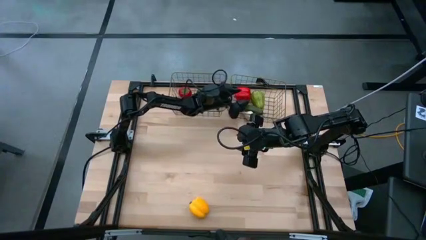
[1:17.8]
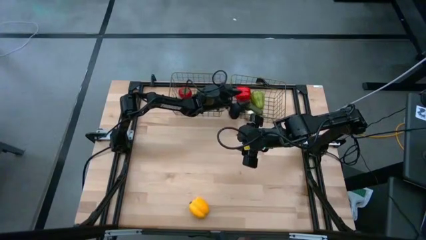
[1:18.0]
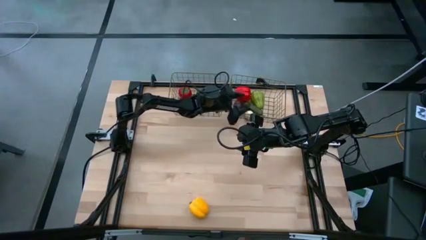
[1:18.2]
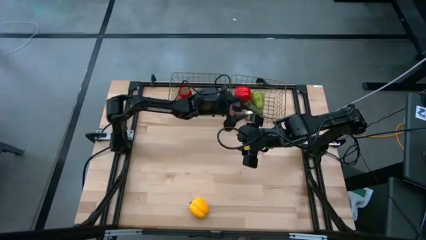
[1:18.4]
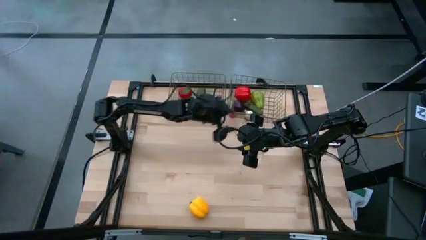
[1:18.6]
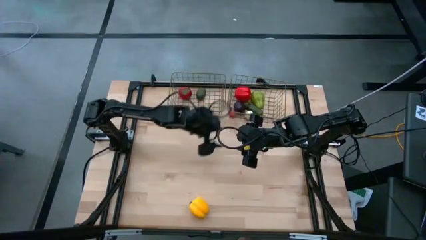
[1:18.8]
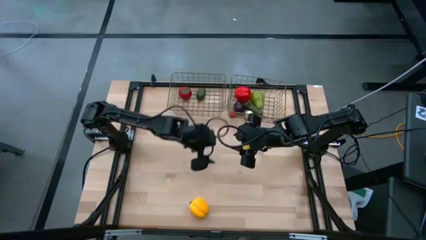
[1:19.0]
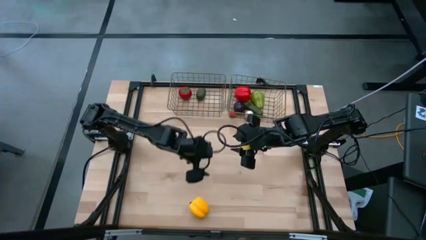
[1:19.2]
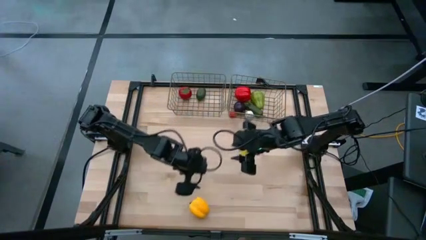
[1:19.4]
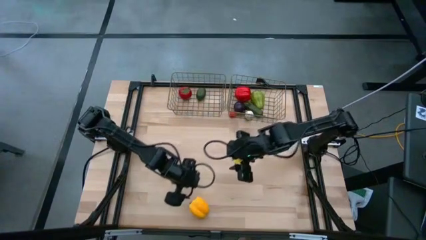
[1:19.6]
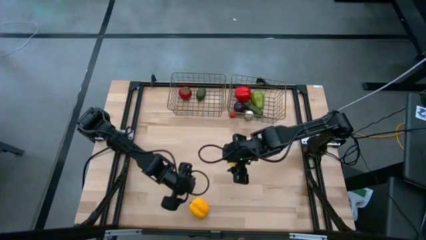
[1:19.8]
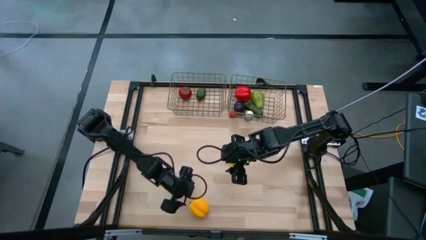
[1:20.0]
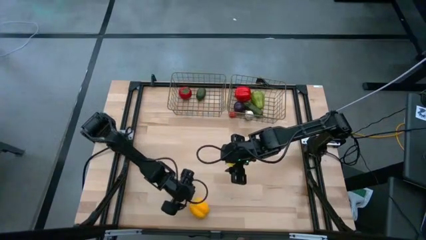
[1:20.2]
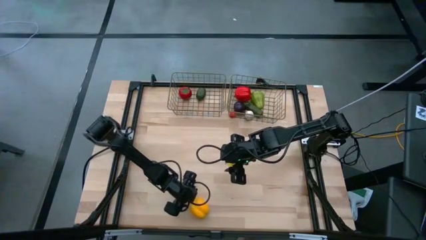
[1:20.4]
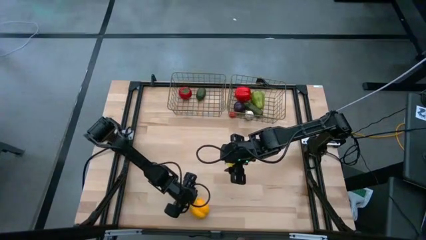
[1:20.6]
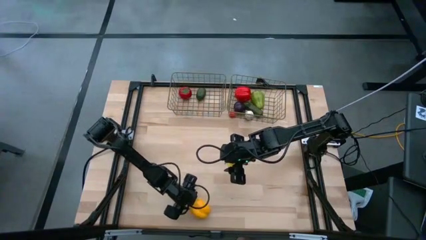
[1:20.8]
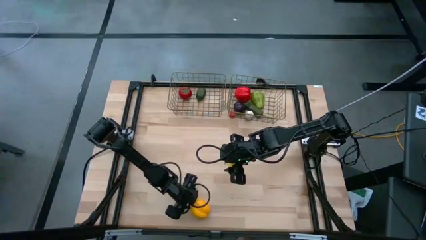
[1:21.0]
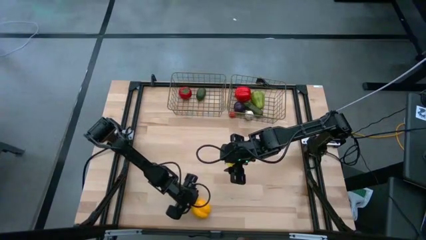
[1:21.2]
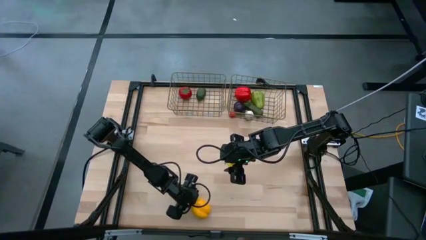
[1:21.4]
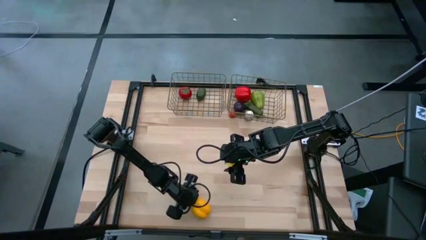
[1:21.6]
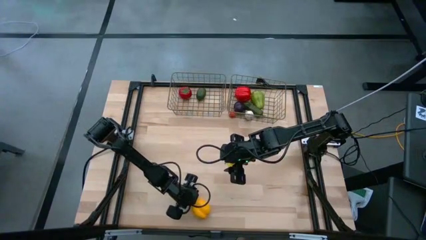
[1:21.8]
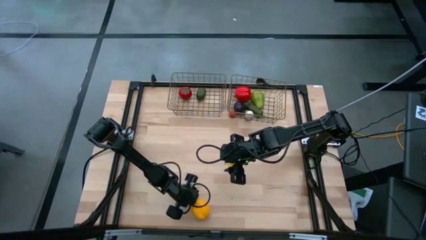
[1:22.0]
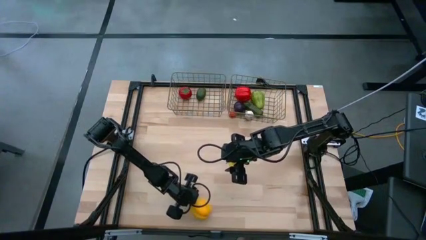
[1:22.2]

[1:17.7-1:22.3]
Task: Sort produce into baskets
Put the yellow bell pepper into the right gold wire basket

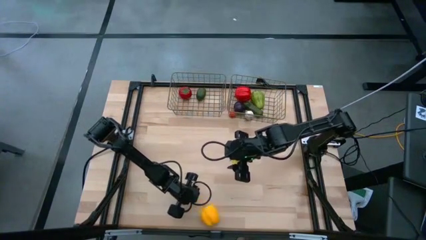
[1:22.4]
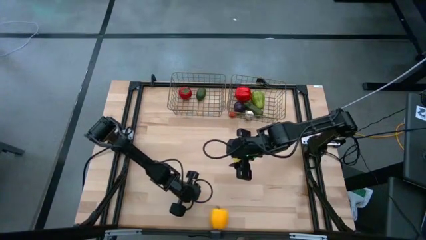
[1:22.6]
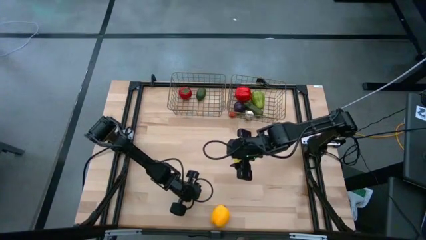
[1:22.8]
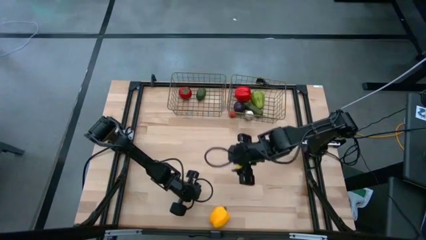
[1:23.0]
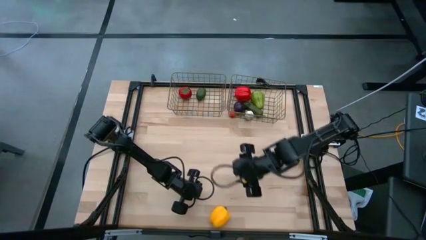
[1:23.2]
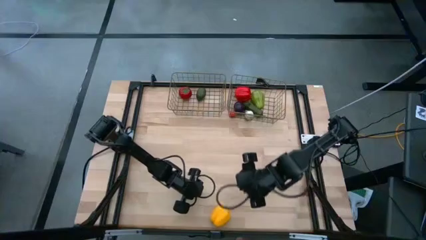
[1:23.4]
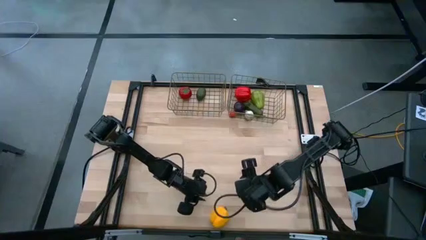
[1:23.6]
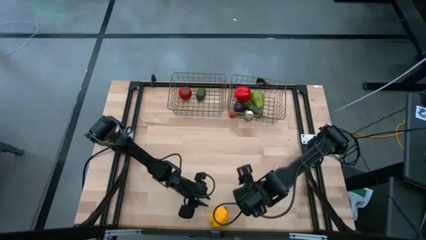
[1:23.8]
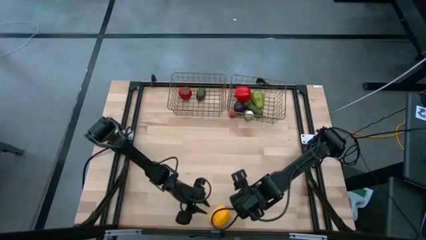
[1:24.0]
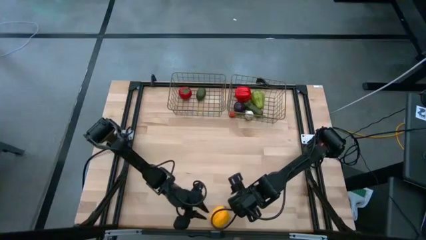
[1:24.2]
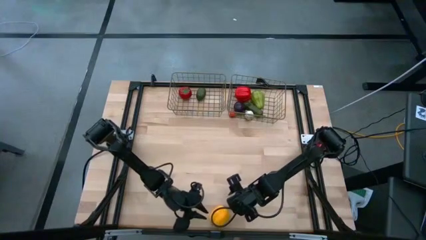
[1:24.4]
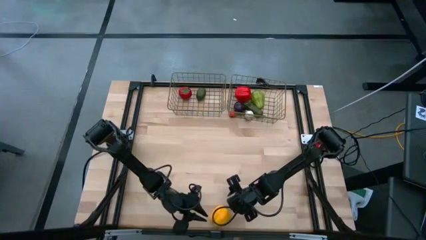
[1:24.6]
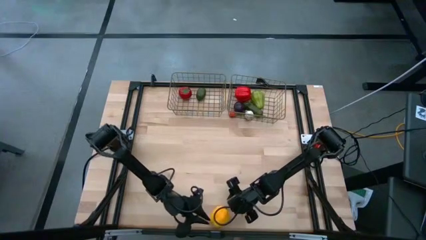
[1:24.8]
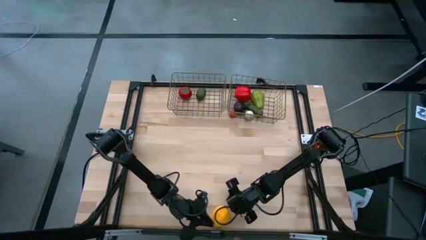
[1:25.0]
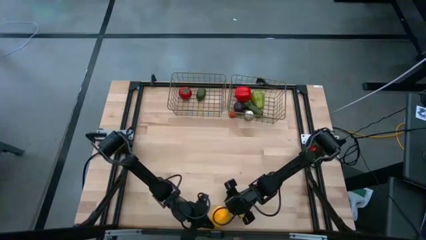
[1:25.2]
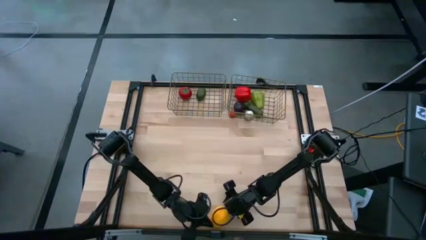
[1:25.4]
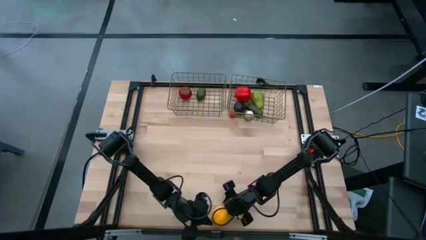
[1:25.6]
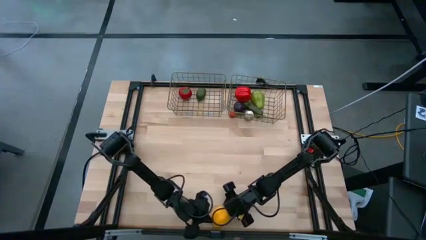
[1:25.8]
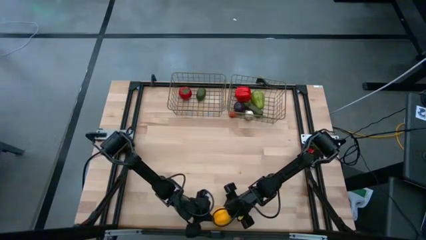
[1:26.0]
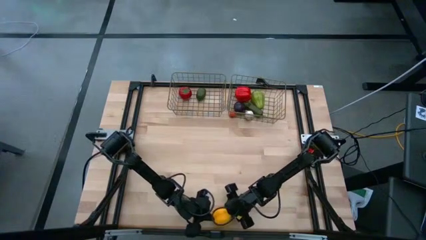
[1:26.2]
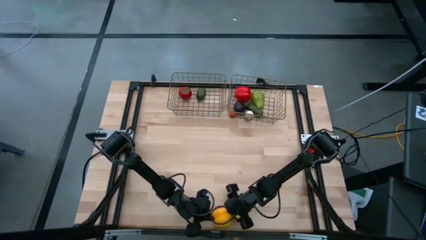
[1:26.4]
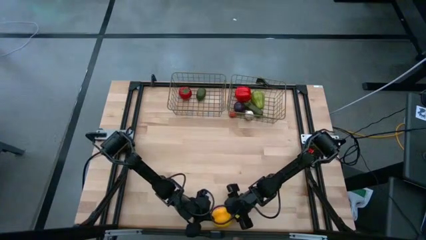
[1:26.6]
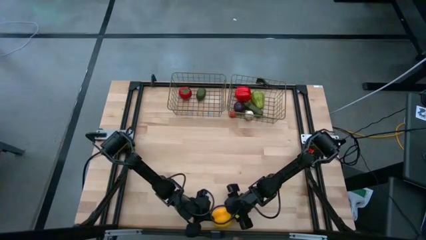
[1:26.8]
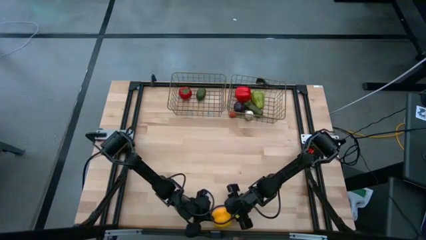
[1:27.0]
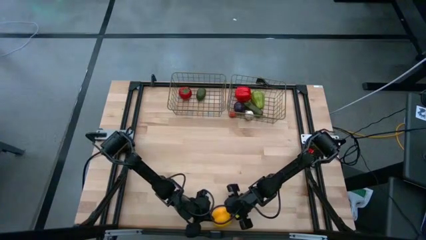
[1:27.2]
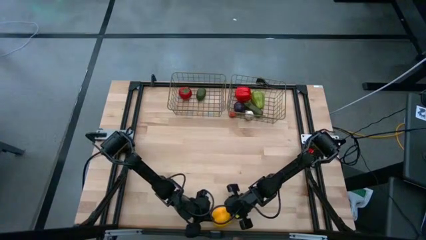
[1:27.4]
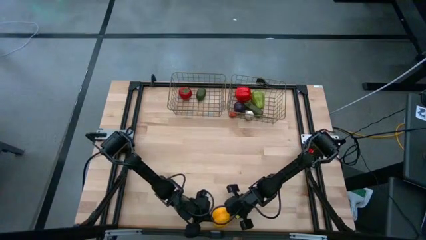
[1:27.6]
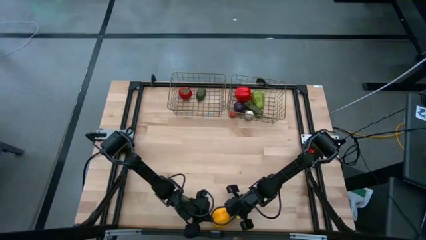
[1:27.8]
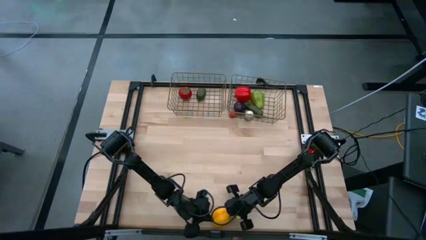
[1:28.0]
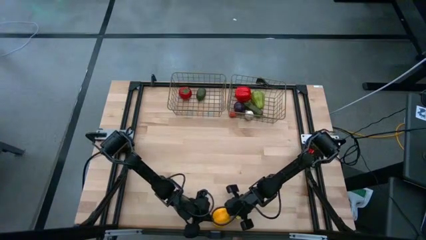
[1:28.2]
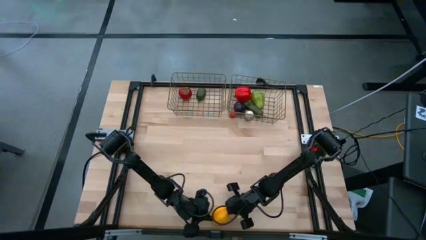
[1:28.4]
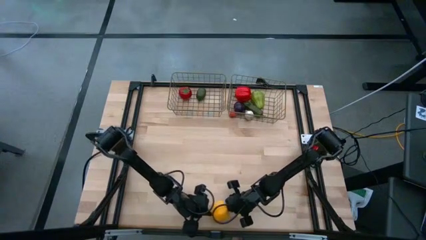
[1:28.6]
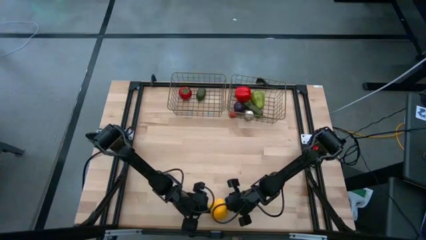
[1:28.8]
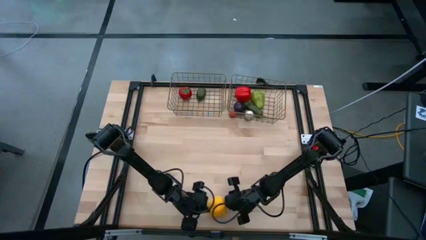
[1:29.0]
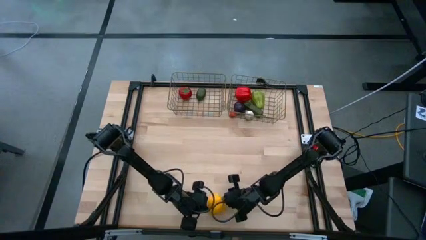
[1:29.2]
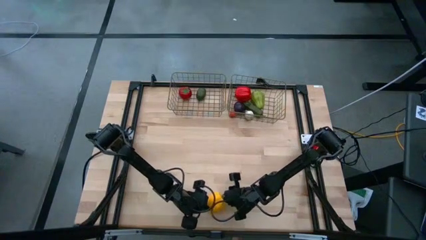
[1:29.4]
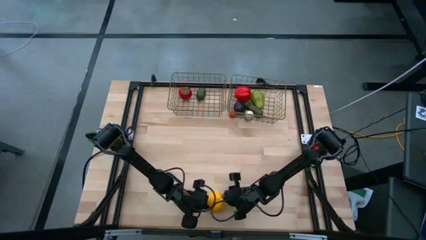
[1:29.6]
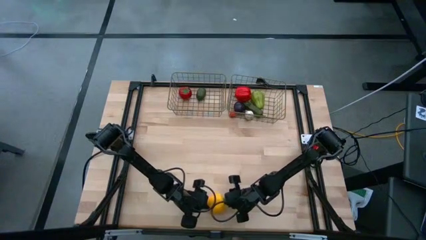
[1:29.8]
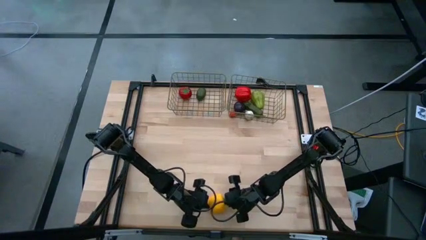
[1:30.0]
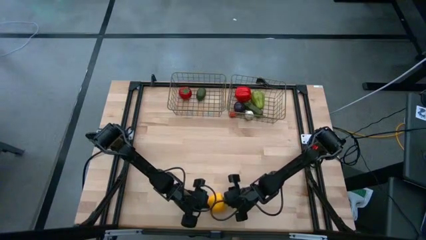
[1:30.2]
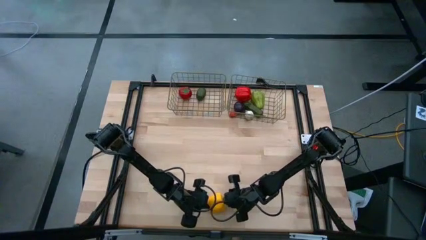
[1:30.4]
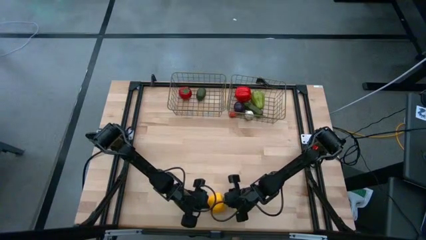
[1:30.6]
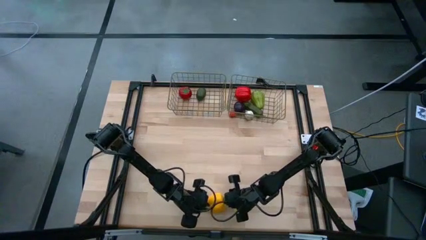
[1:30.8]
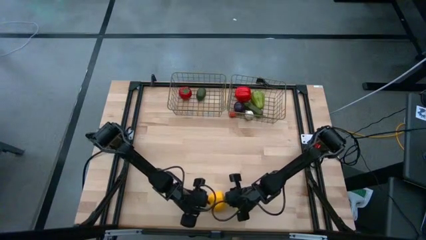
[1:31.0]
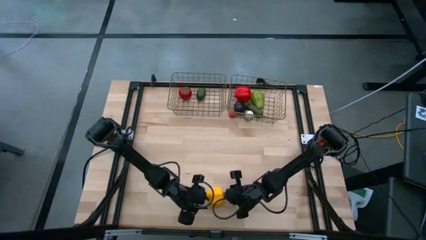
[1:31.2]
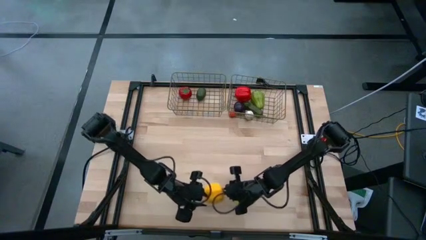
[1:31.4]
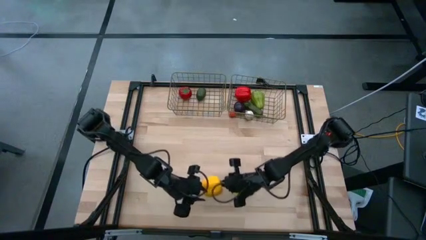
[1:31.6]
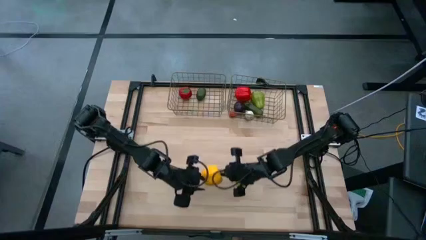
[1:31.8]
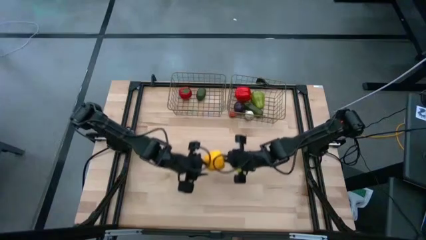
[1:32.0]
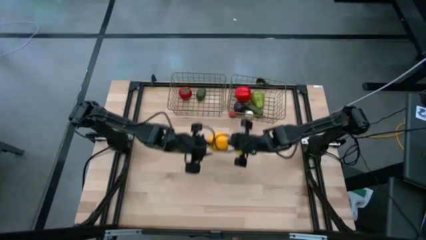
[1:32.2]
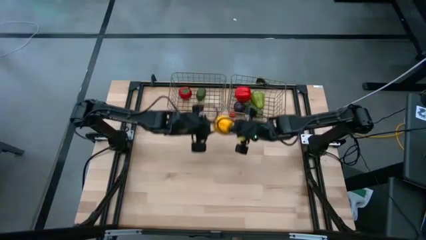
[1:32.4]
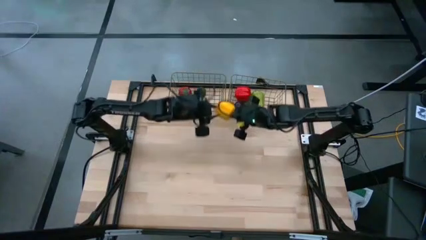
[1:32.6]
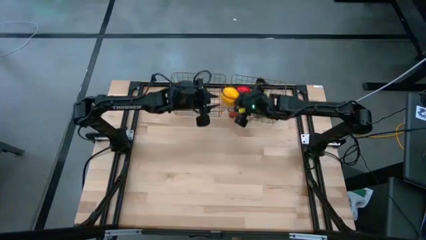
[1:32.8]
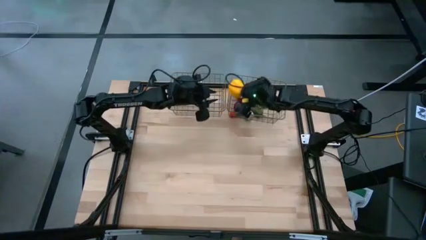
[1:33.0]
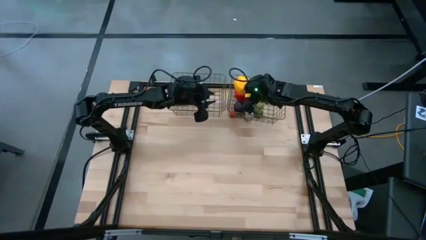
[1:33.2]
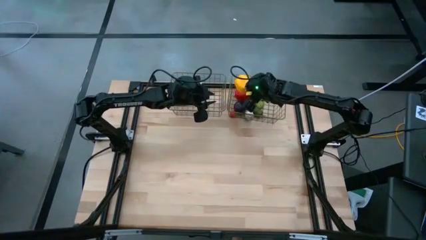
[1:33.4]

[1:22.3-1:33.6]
Put the yellow bell pepper into the right gold wire basket
